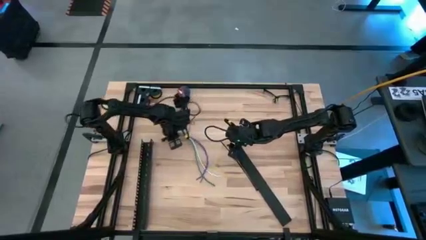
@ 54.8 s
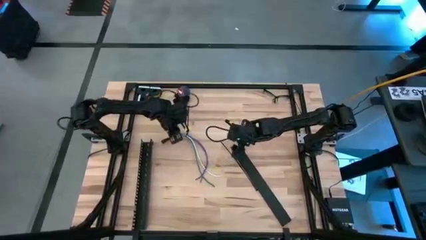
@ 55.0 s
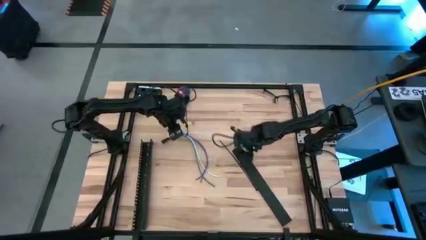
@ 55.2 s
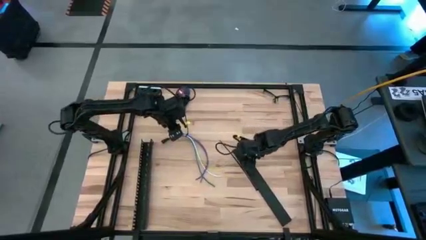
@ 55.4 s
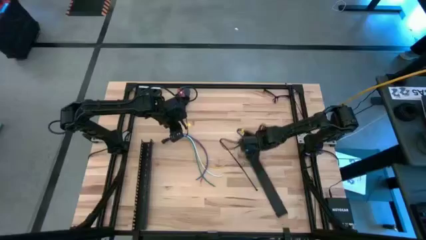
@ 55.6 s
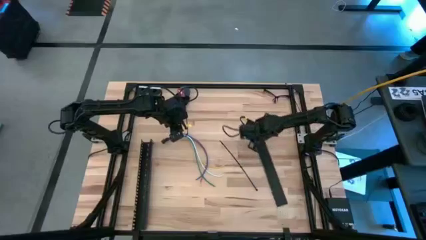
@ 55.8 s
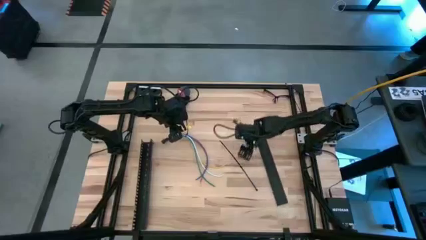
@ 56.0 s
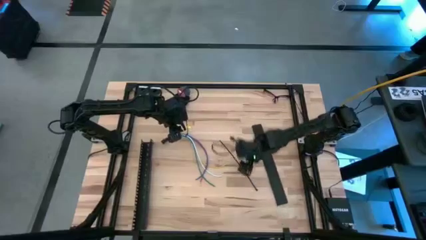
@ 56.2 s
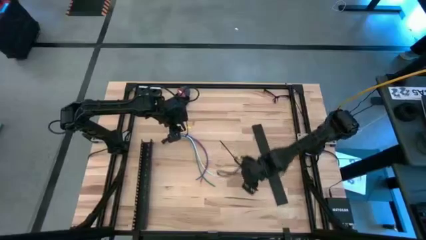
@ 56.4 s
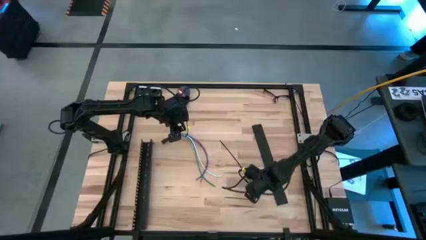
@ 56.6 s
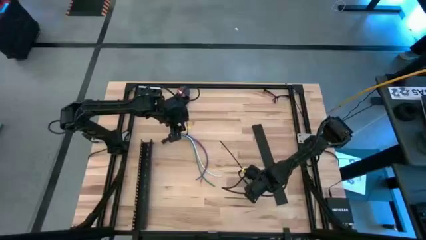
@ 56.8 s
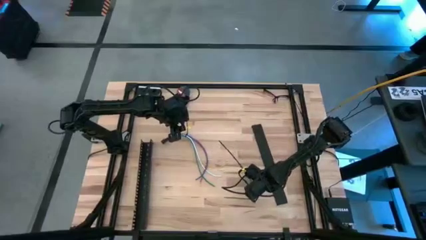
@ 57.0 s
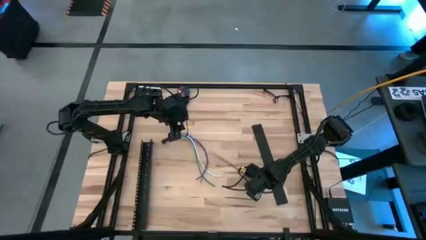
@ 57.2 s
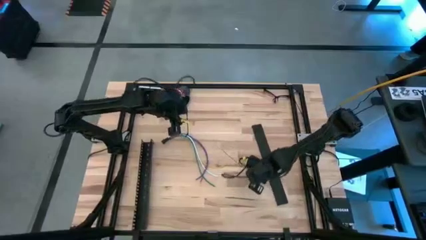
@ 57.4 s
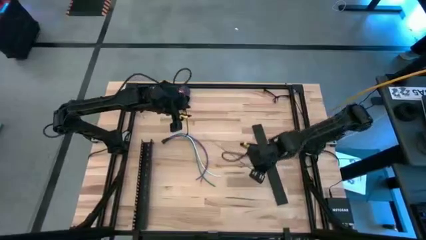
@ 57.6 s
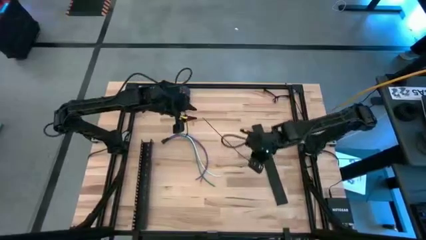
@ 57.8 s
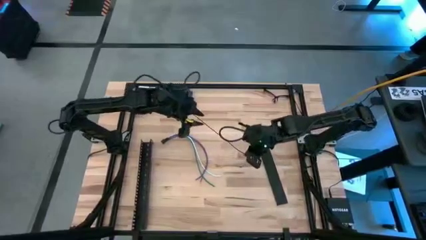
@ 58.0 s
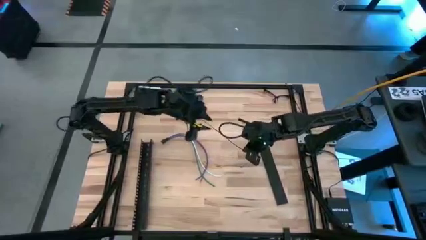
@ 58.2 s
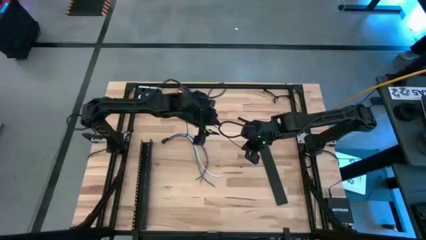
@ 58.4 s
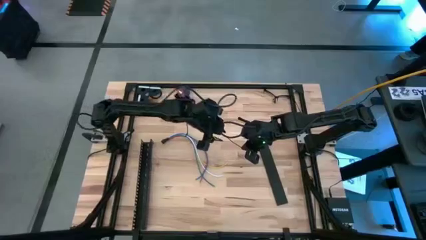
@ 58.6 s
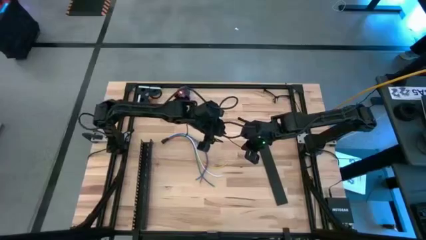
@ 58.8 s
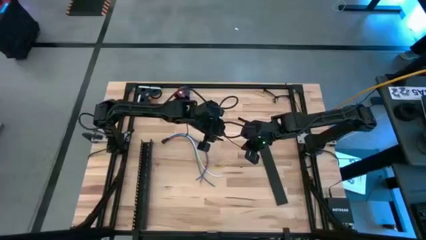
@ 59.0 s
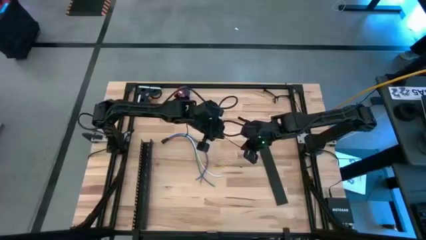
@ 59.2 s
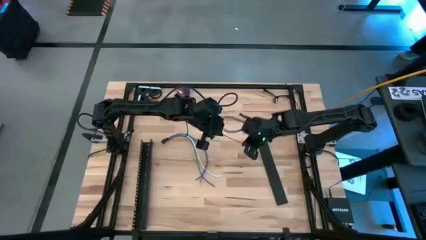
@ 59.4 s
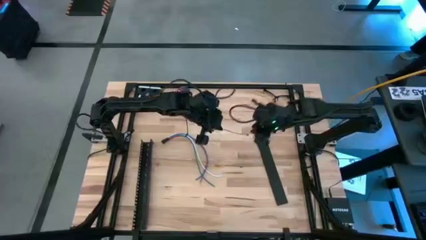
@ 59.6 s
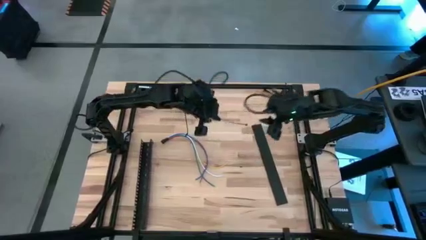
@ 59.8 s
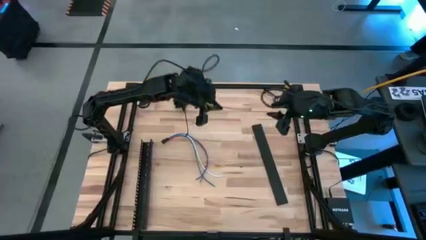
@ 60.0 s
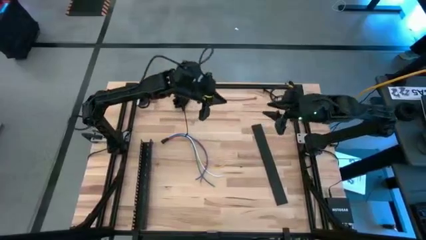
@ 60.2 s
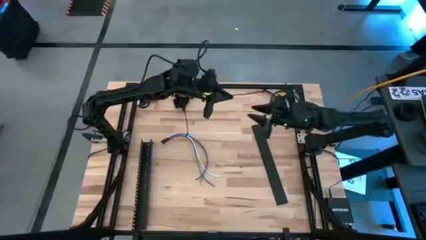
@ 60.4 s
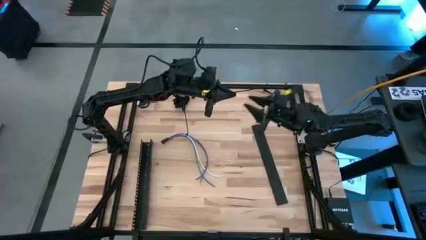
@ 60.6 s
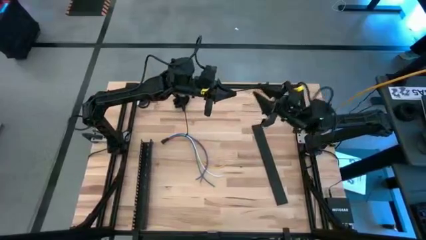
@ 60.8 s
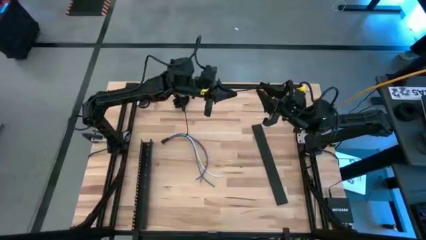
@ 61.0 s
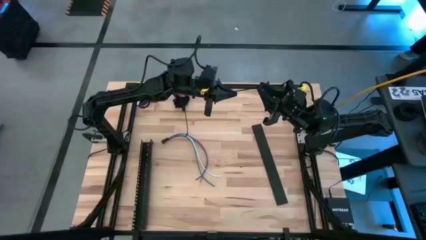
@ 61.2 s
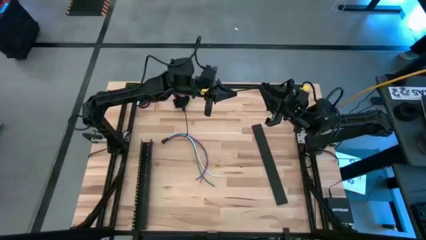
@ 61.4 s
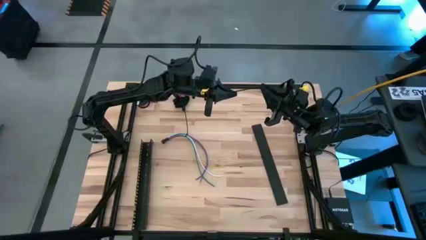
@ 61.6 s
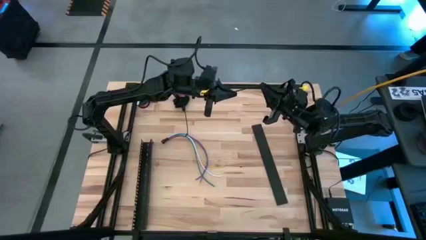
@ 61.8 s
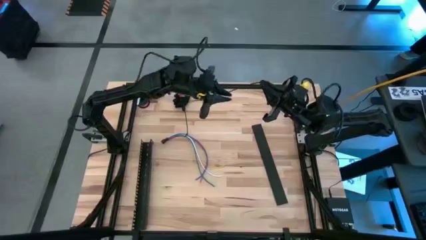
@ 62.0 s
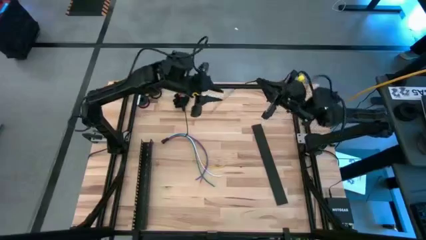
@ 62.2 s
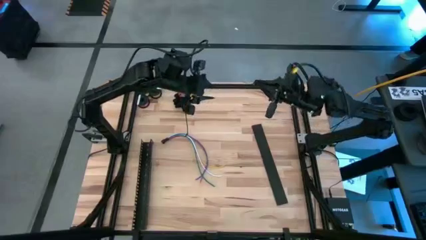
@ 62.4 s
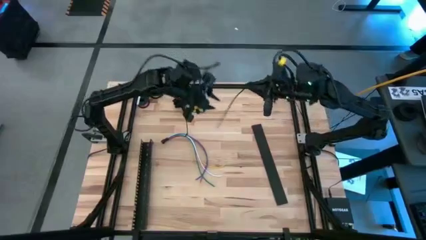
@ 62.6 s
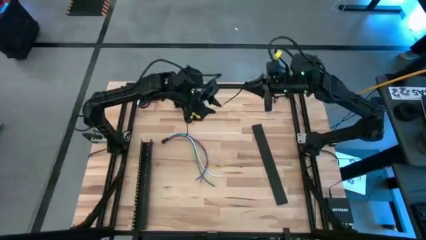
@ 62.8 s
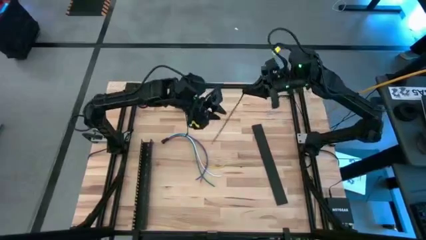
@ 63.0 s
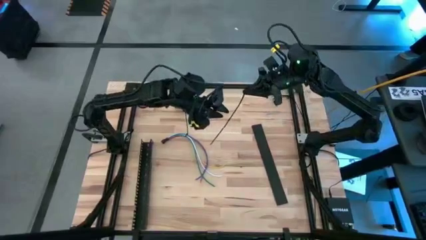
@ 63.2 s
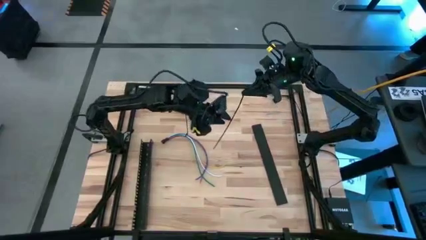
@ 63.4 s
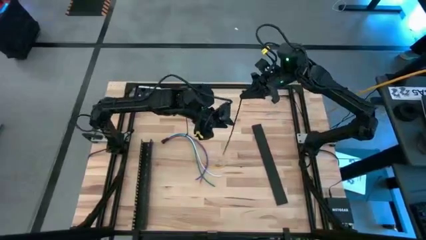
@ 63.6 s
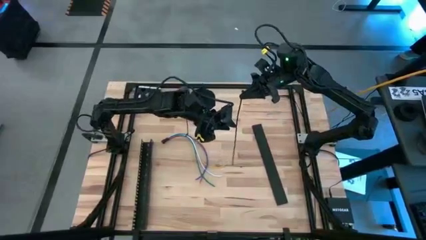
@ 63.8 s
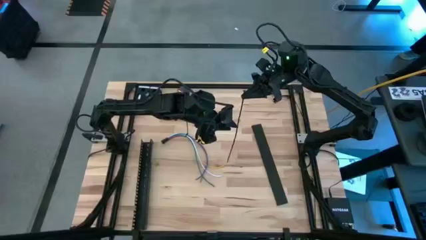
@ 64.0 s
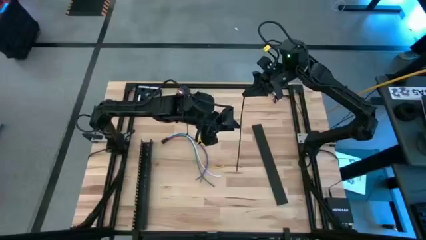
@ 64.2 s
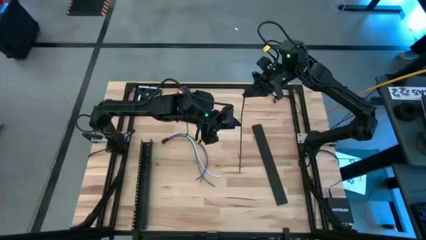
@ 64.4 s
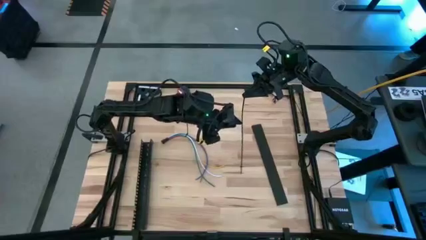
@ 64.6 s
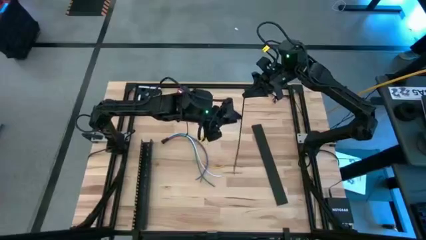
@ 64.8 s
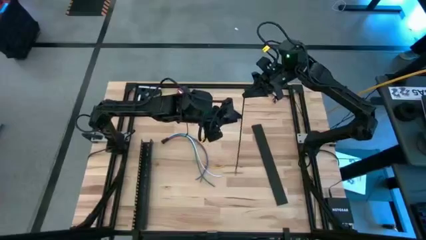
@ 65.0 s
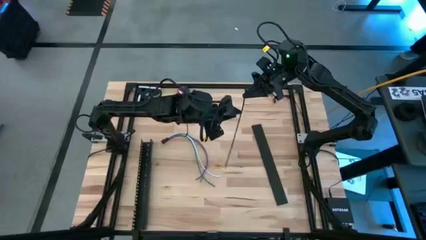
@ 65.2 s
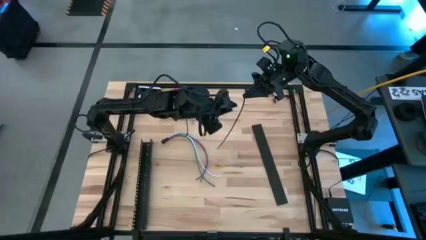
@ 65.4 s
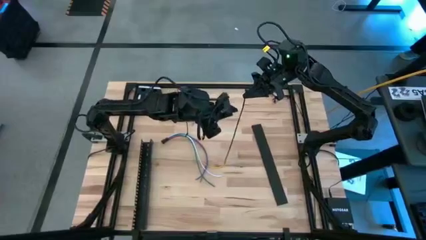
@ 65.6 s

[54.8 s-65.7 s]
Task: Ziptie cables
Insert the black zip tie tail into the locking head
